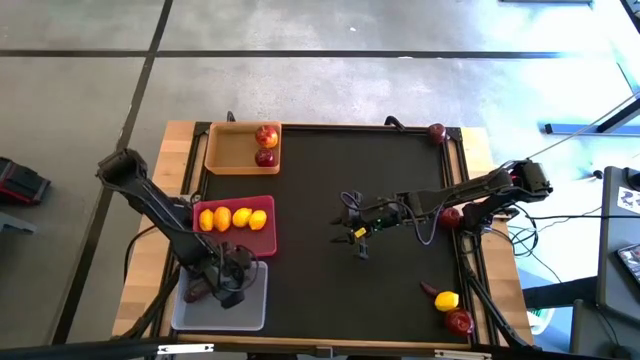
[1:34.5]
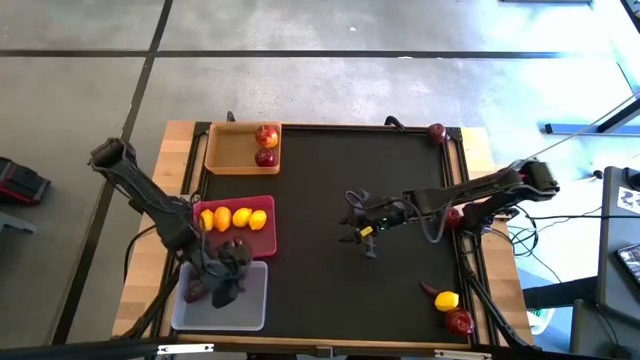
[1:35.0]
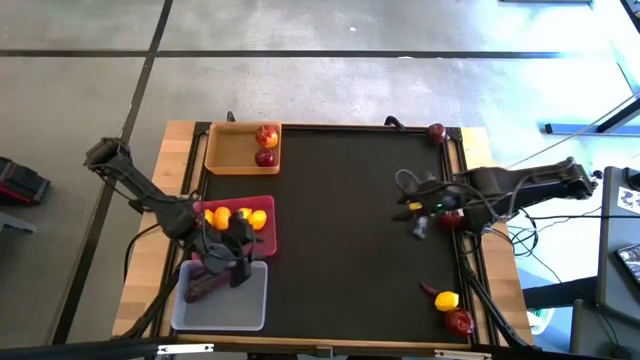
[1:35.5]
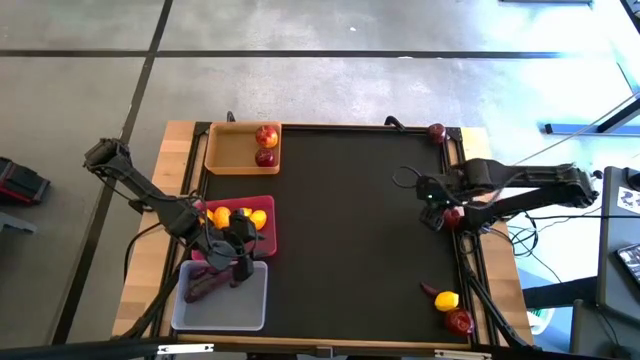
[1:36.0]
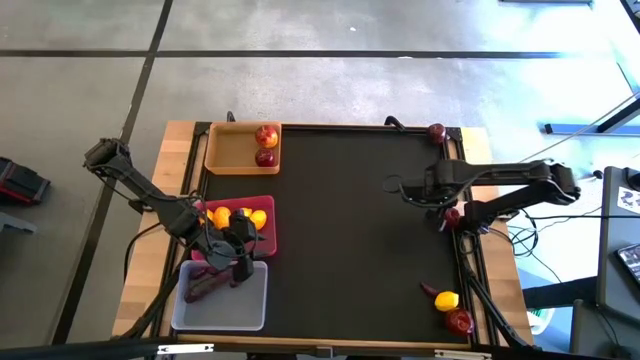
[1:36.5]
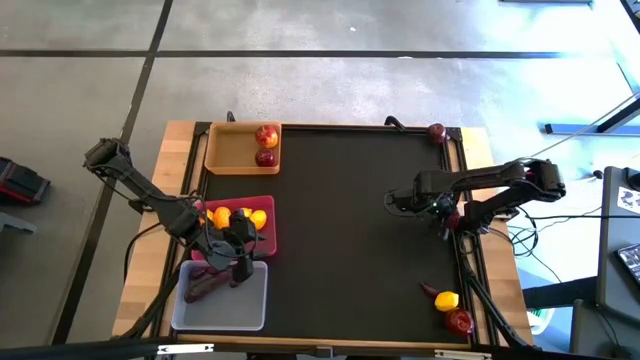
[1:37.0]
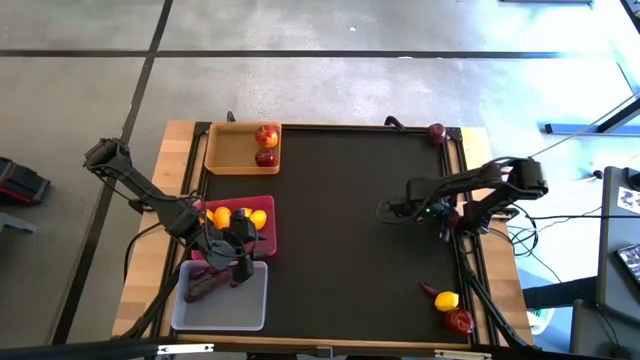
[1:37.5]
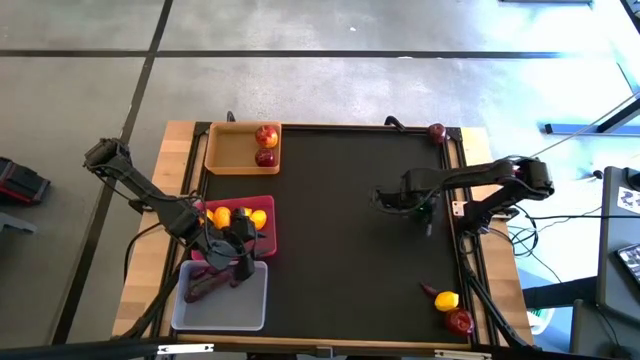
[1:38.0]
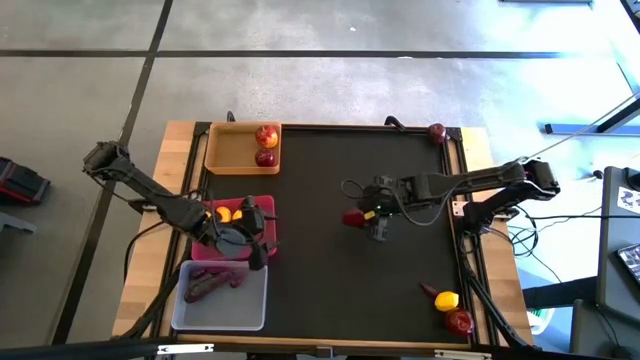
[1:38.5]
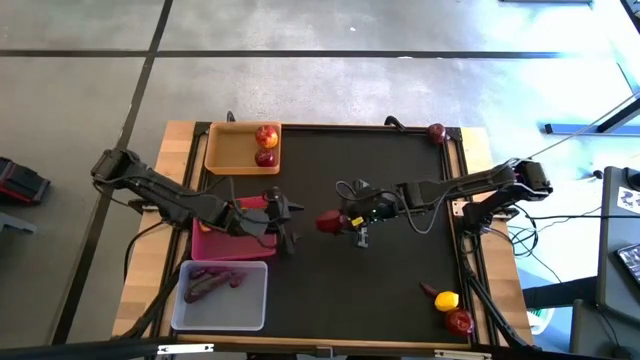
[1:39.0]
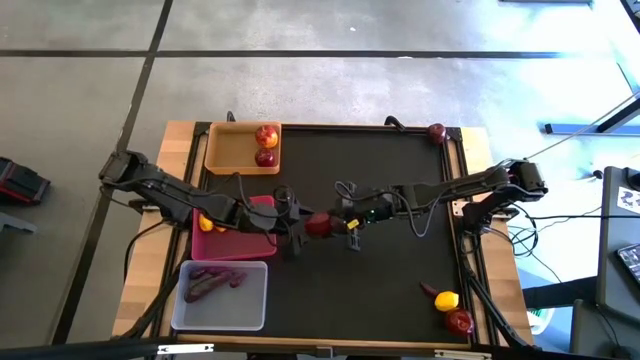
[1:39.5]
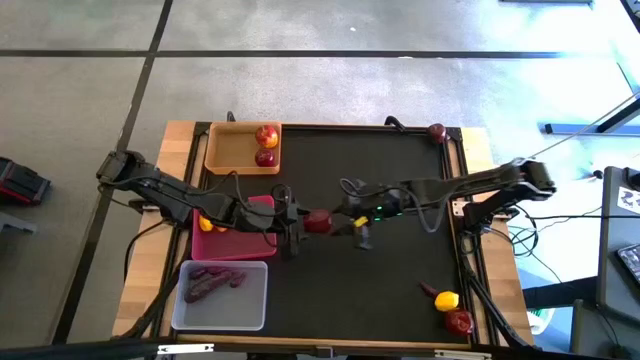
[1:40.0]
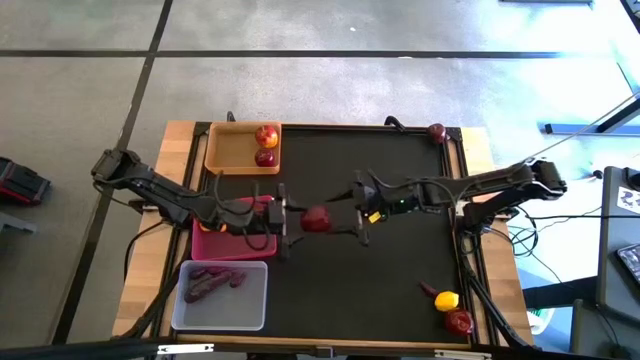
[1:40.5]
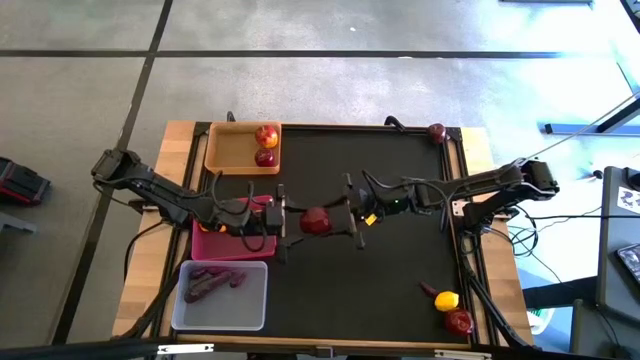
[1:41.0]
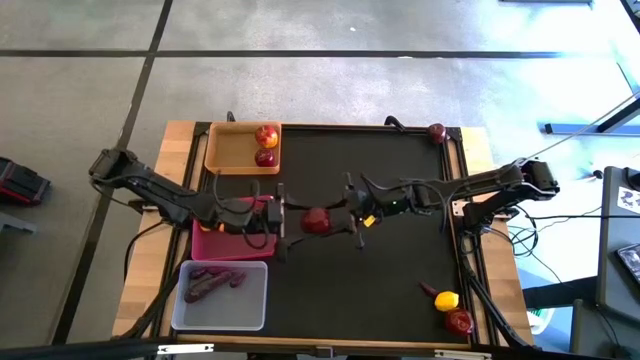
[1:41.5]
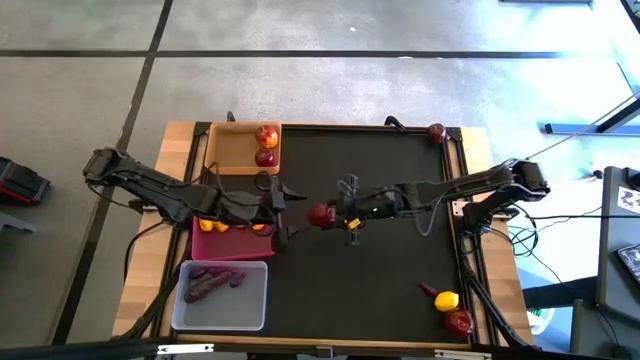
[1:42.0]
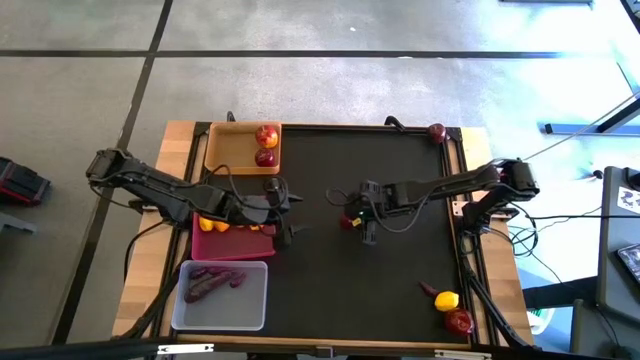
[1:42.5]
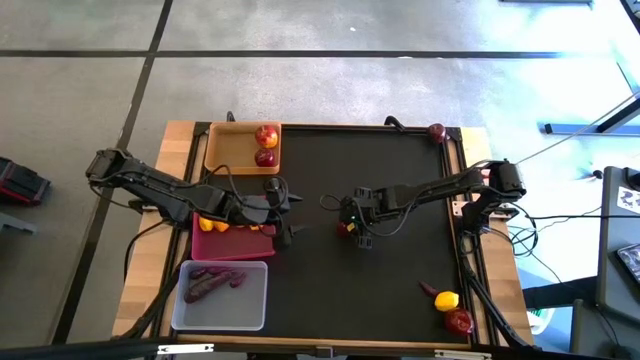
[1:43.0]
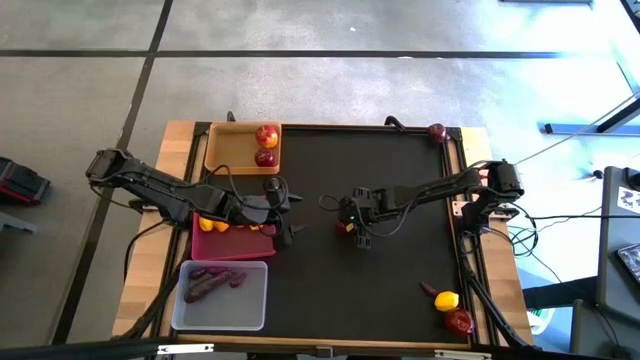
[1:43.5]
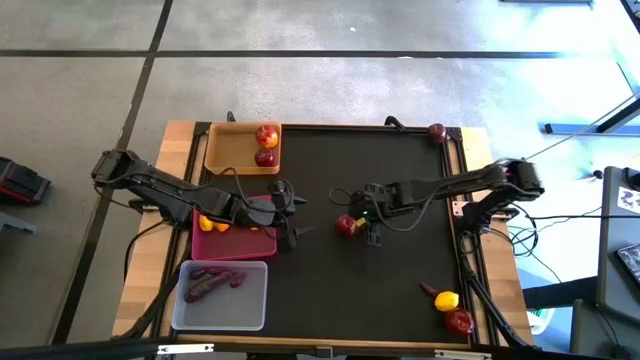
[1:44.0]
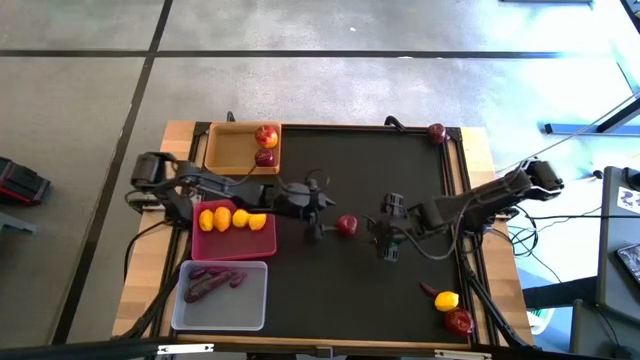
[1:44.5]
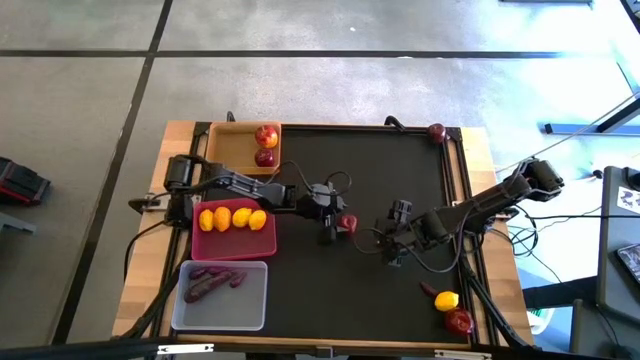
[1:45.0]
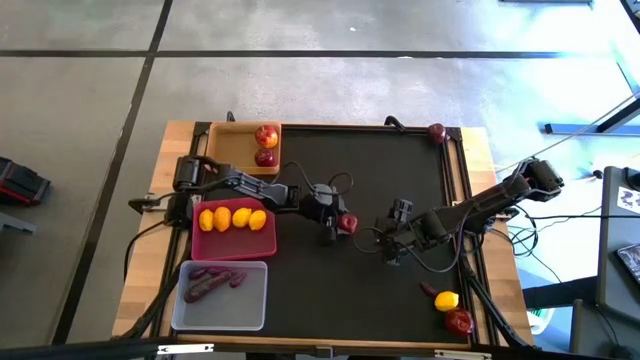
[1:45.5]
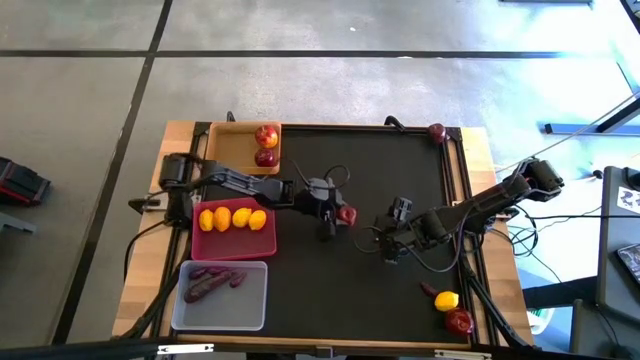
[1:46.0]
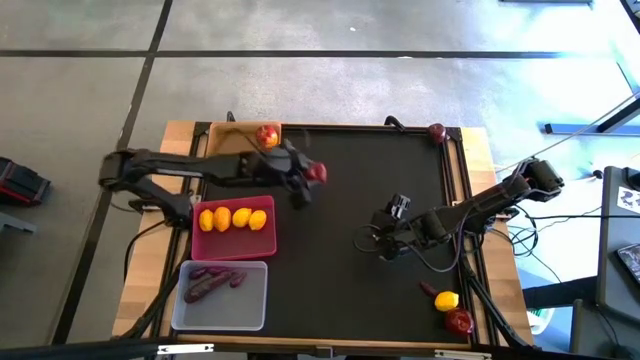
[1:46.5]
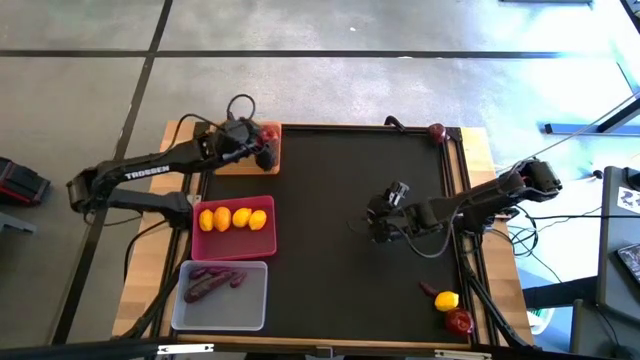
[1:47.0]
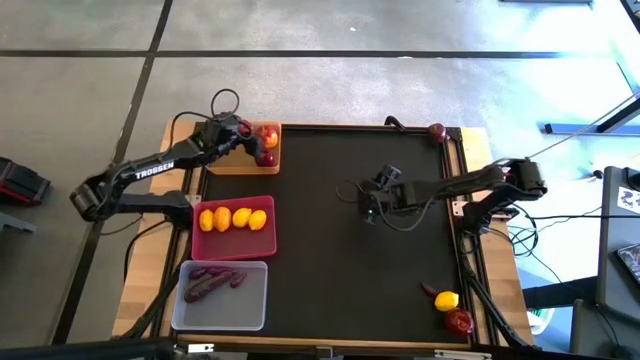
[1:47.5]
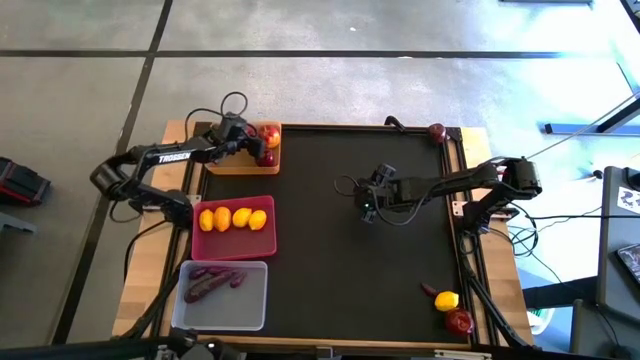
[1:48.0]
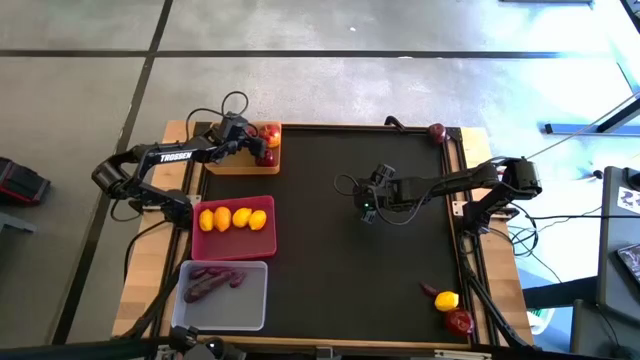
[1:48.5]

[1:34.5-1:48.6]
Task: Sort produce into baskets
Put the middle apple into the orange bin

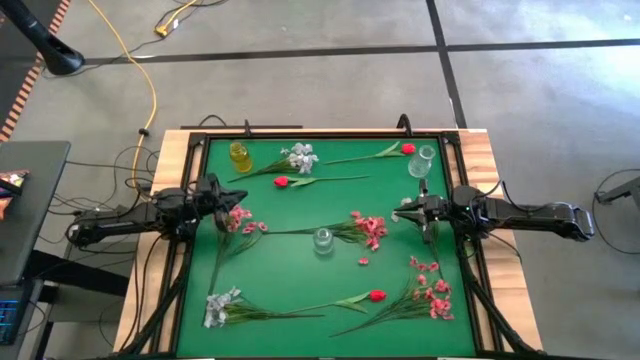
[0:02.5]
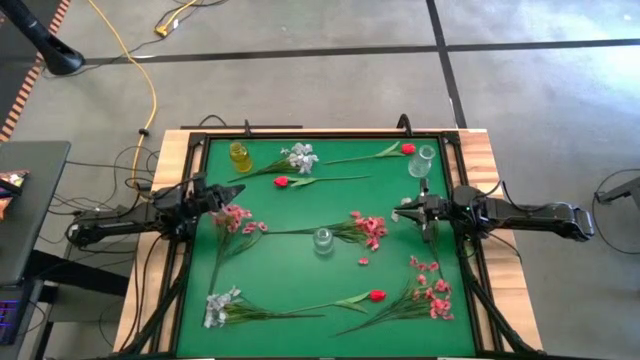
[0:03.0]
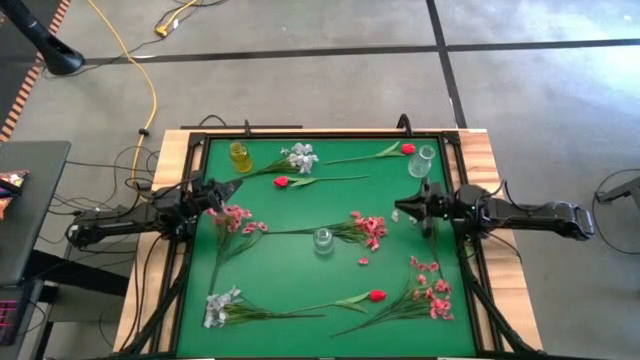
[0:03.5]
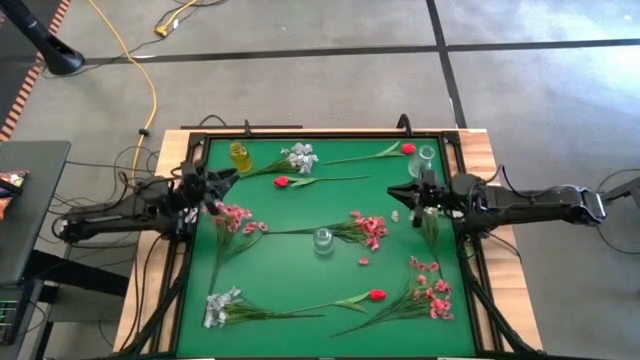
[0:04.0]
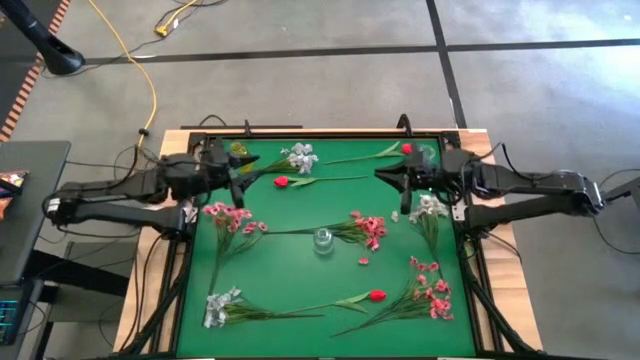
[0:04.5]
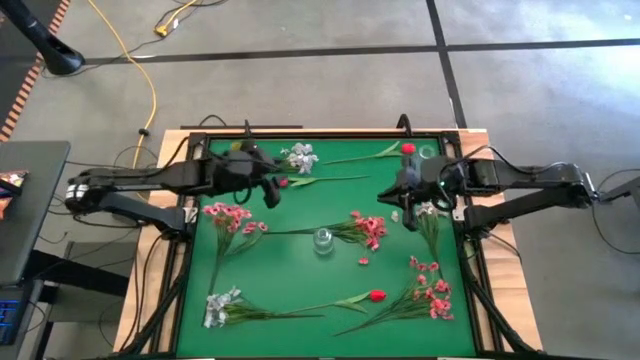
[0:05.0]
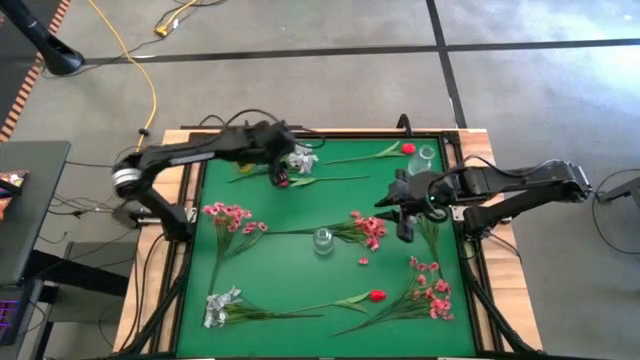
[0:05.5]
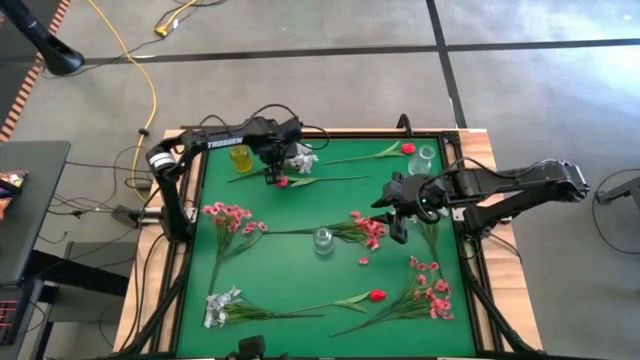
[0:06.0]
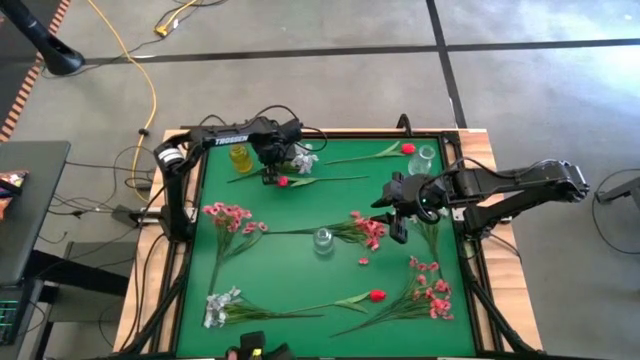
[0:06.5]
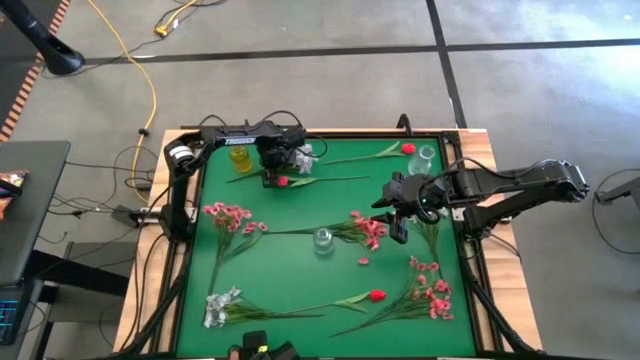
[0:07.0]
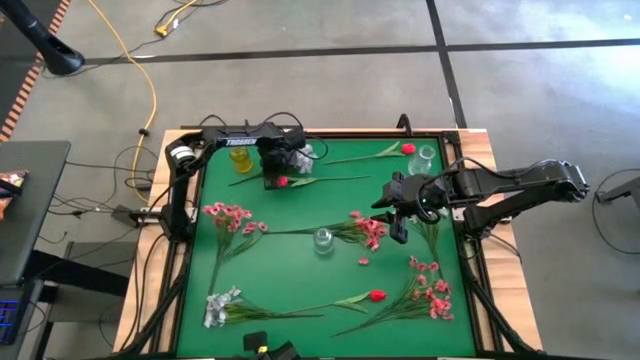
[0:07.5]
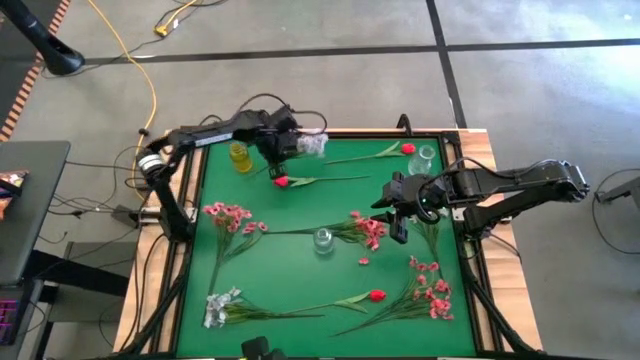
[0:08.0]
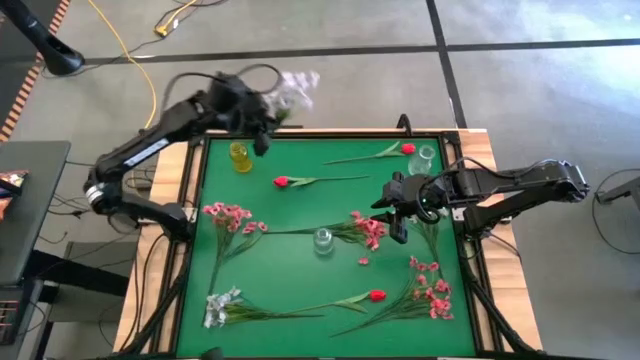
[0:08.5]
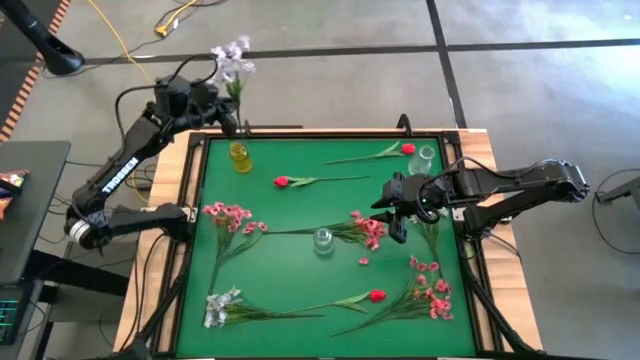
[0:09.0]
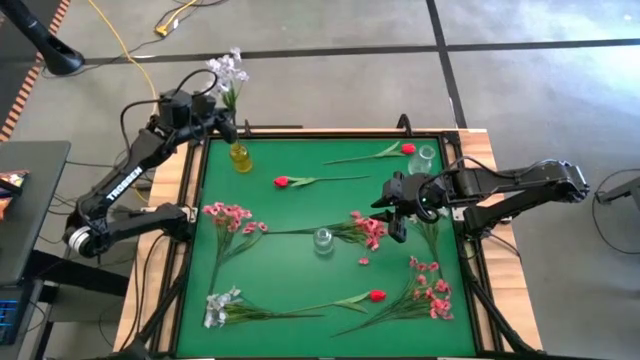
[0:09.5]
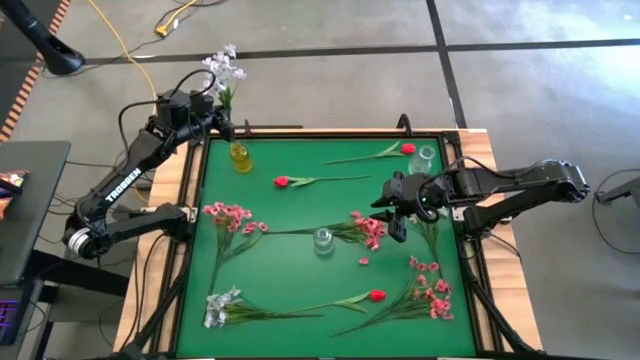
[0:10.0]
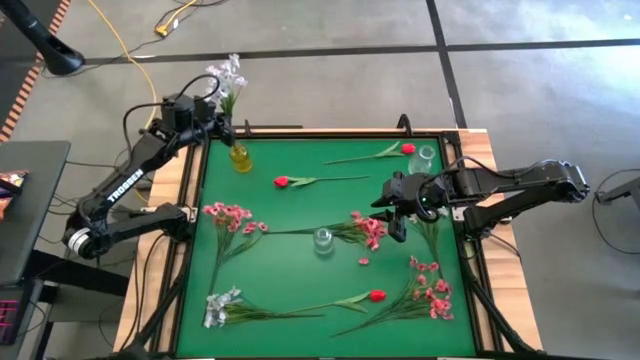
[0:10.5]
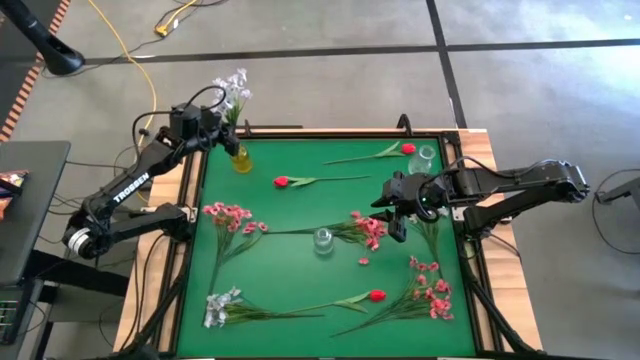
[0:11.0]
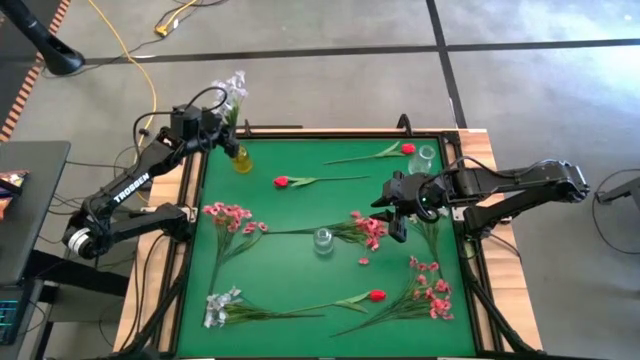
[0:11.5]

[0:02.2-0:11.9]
Task: Sort flowers into vase by color
Put the top white flowers into the yellow vase
